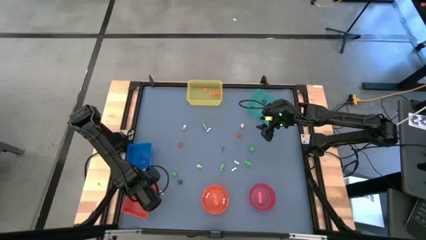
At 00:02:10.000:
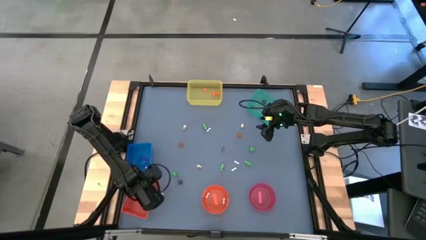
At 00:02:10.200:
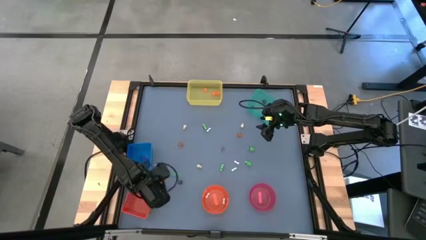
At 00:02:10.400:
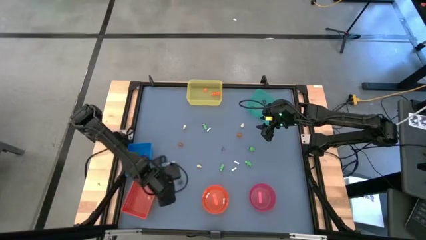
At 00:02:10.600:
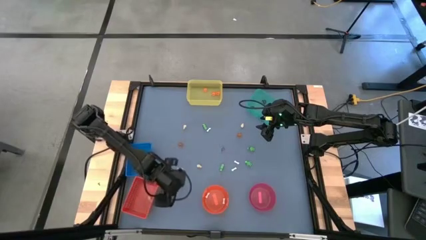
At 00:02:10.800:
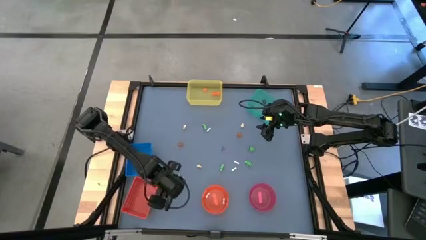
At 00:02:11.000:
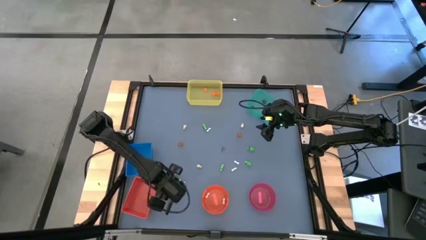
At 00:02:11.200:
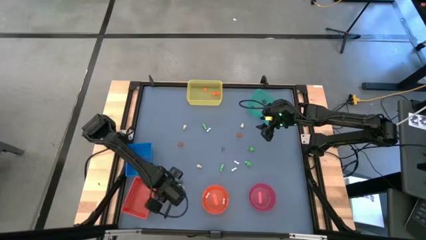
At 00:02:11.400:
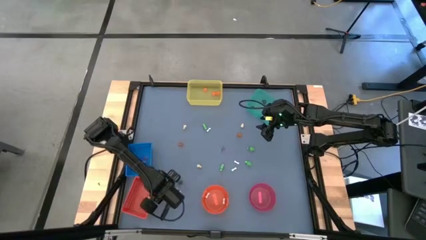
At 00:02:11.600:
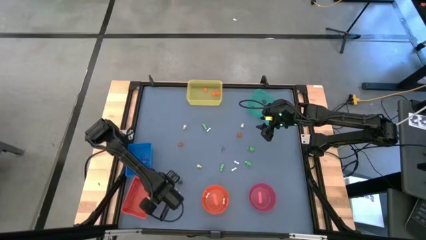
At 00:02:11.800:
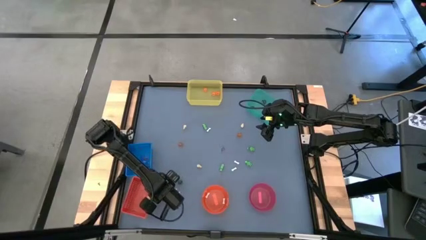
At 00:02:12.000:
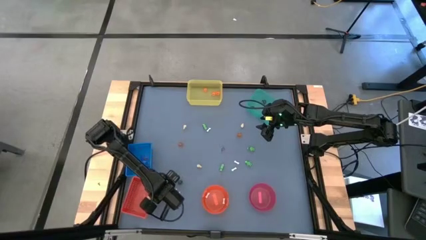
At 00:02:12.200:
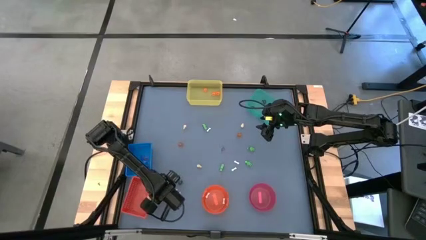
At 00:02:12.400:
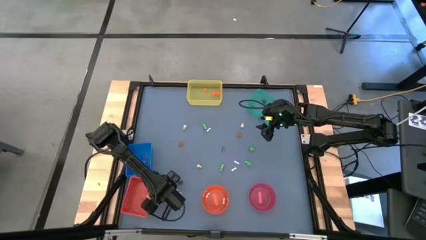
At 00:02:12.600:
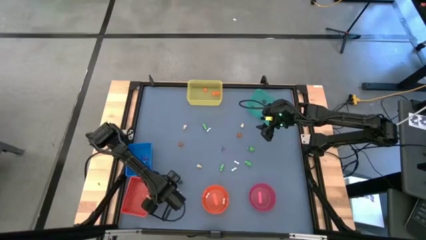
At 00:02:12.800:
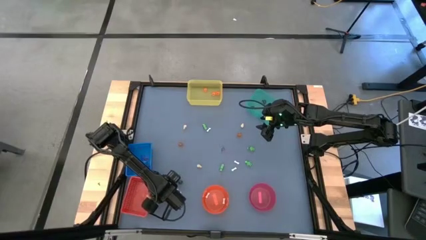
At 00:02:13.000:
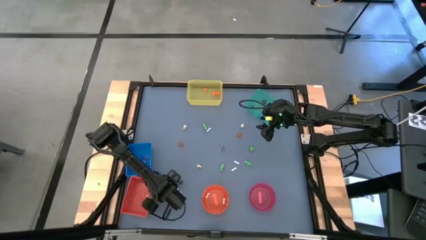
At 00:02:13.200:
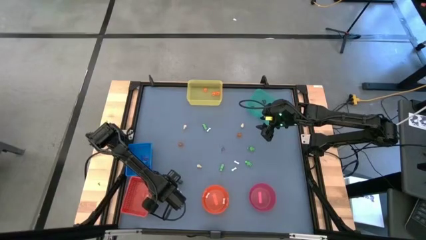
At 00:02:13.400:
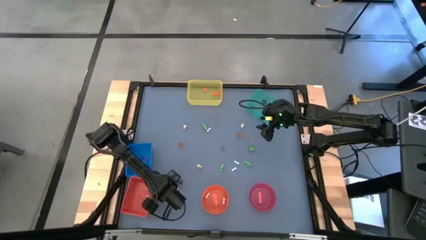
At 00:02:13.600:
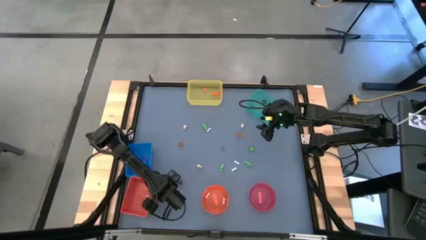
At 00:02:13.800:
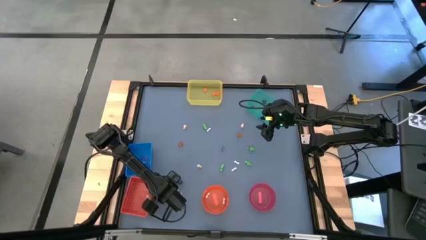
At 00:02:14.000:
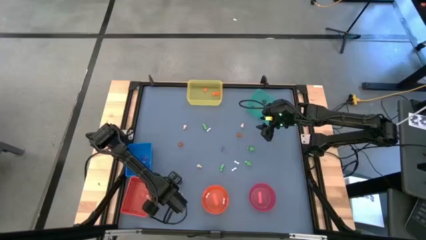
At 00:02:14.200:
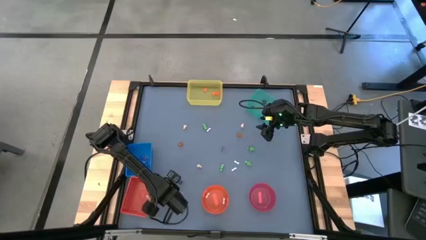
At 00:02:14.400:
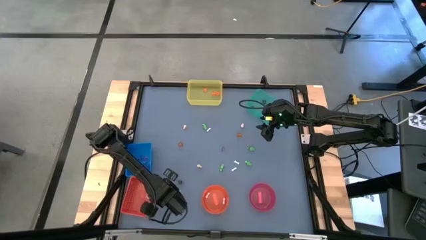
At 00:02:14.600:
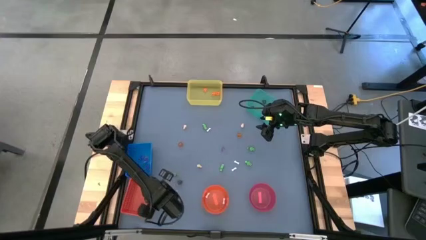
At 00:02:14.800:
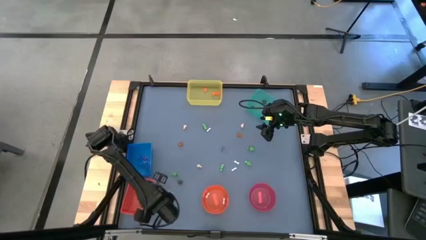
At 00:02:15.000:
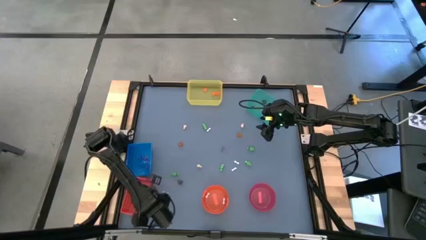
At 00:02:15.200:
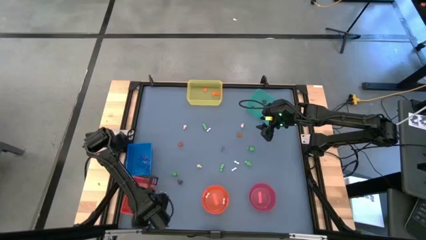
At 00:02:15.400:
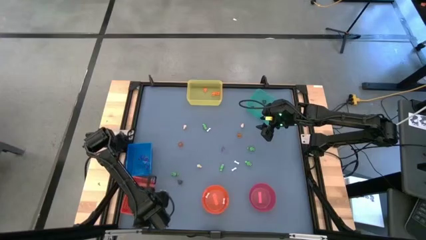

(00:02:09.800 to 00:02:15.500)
Task: Sort Halloween decoration
Put the brown skull toy into the red bin

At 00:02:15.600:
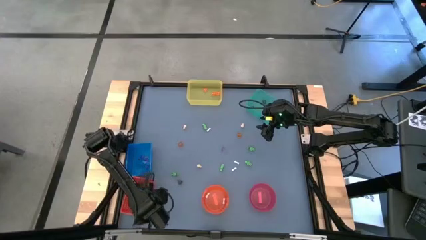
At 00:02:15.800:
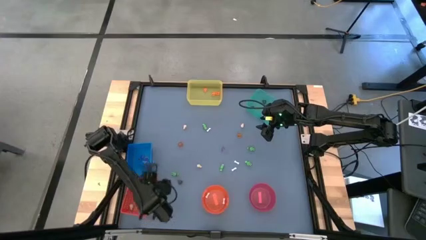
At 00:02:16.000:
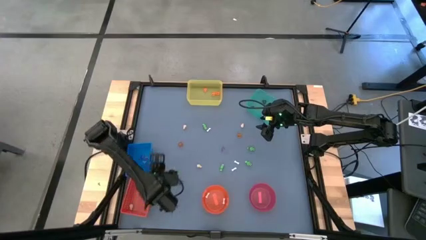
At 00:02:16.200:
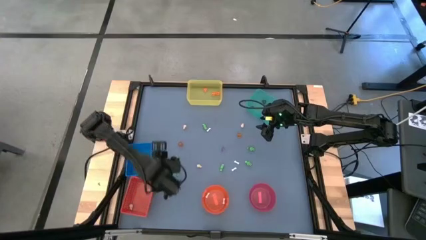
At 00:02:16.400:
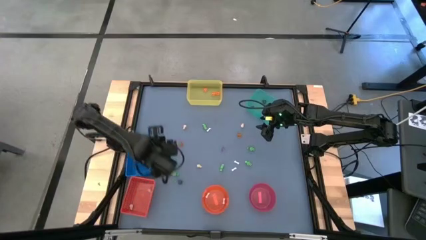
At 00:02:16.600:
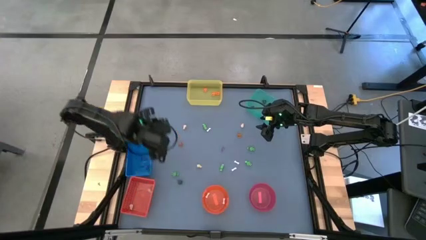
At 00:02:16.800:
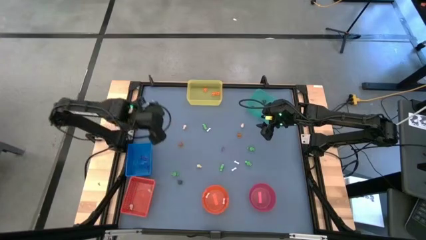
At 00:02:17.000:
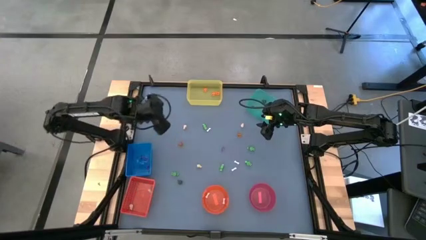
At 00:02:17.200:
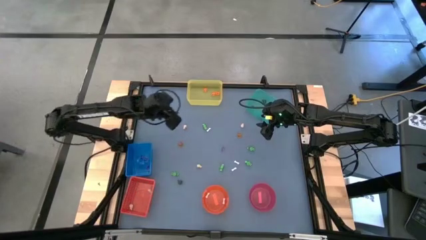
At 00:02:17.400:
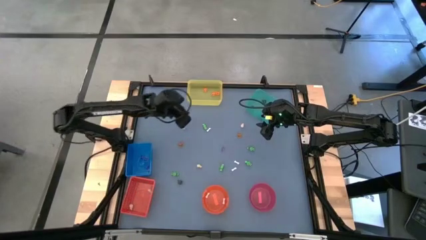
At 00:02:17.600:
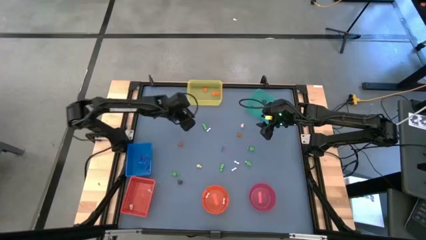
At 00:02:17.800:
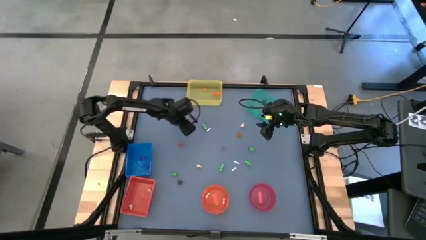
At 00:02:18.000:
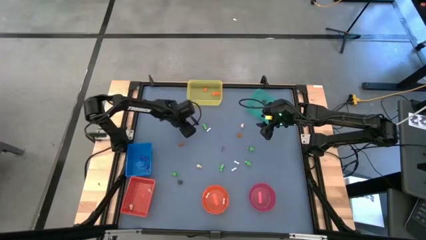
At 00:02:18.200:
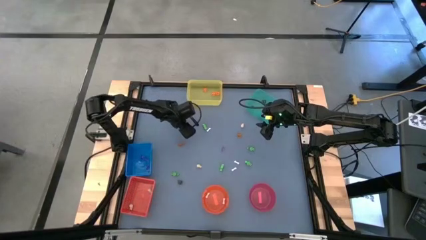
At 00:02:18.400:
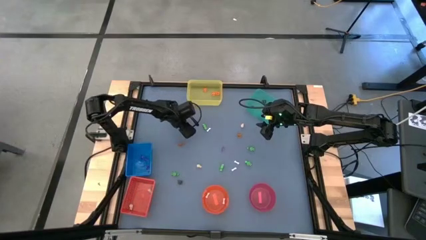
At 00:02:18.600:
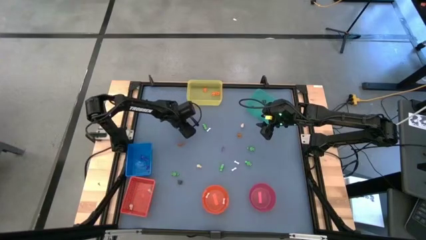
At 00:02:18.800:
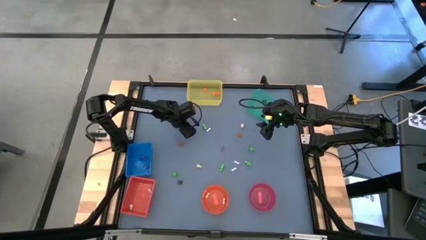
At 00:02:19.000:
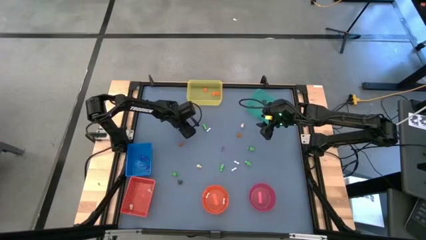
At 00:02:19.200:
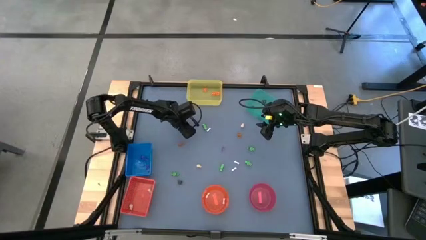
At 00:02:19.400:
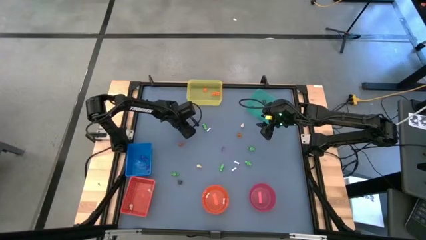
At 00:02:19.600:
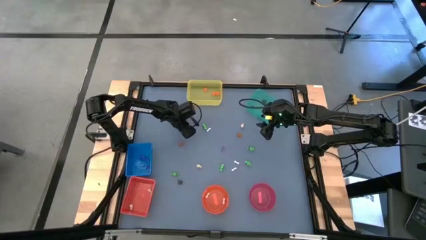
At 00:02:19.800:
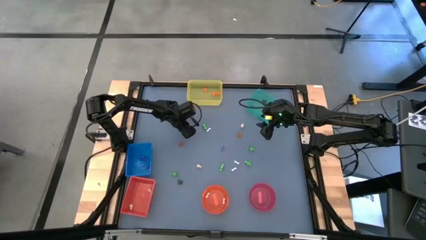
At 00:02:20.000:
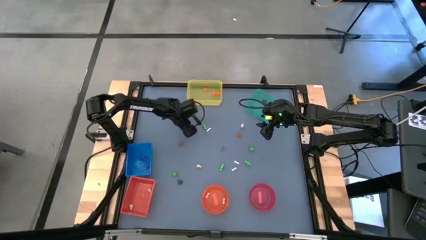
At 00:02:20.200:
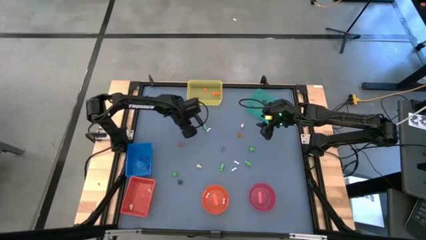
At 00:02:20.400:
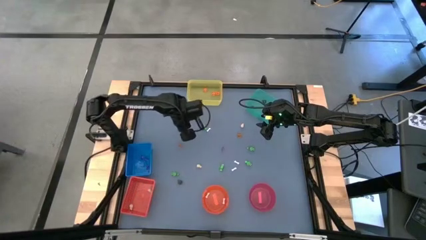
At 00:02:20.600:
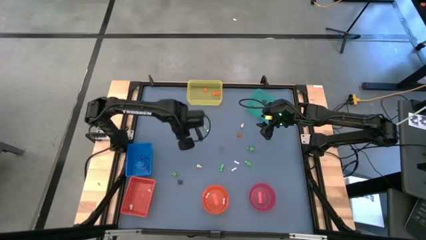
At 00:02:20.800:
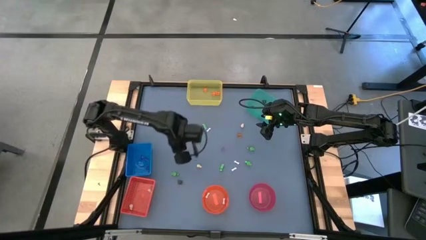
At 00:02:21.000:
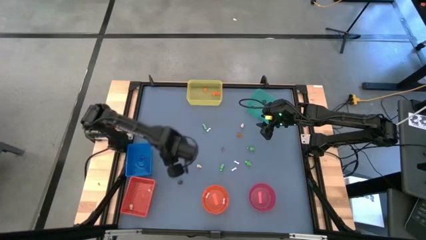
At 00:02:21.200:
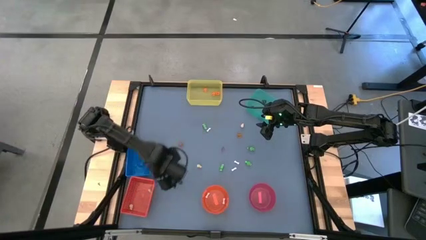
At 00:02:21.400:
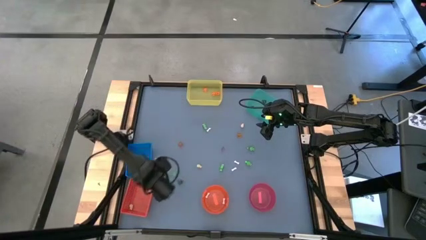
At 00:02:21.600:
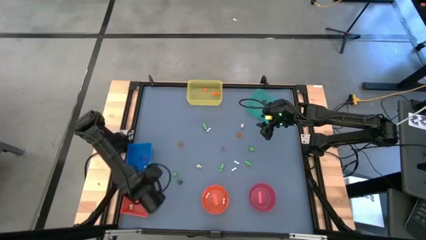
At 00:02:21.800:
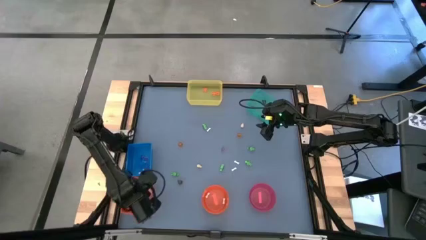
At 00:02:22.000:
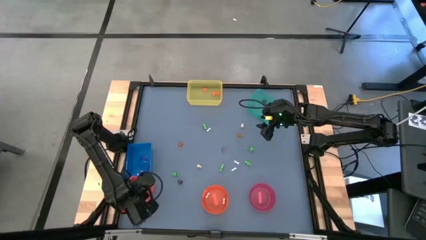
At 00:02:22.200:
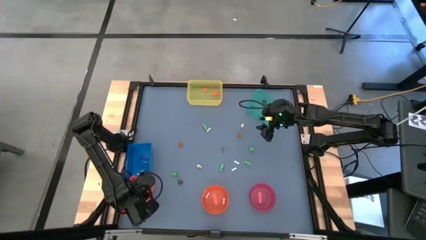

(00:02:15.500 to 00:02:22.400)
Put the brown skull toy into the red bin

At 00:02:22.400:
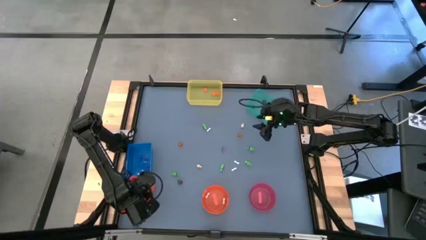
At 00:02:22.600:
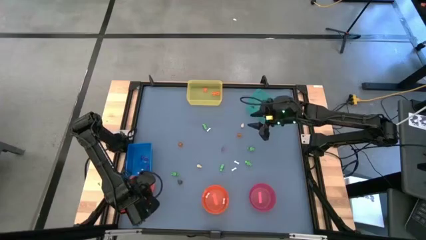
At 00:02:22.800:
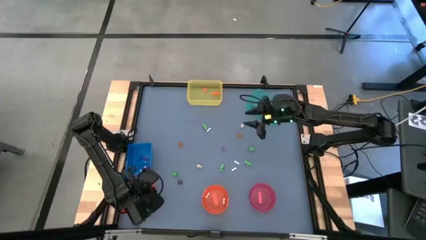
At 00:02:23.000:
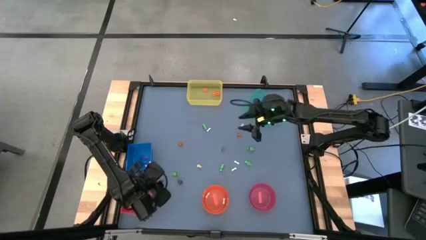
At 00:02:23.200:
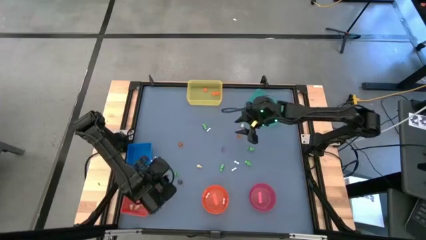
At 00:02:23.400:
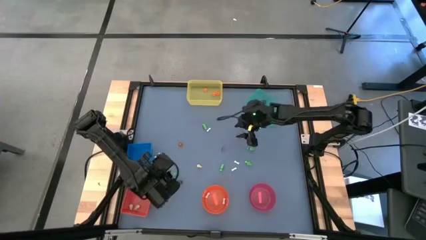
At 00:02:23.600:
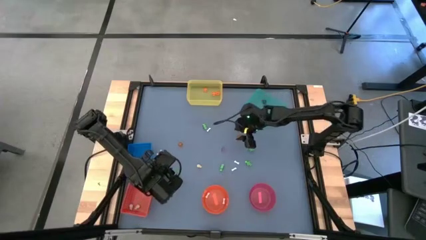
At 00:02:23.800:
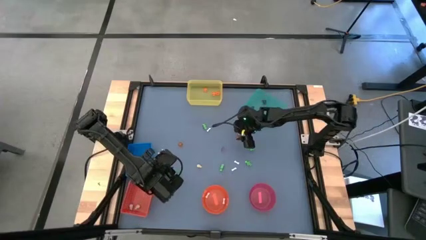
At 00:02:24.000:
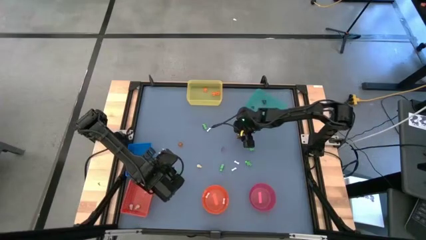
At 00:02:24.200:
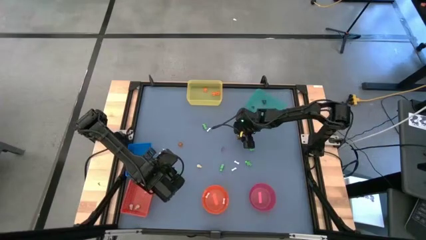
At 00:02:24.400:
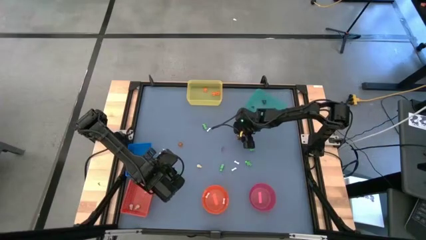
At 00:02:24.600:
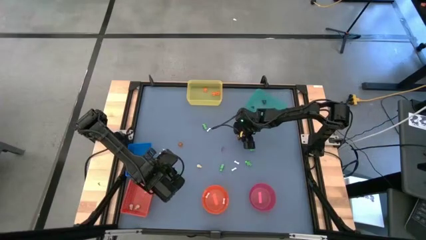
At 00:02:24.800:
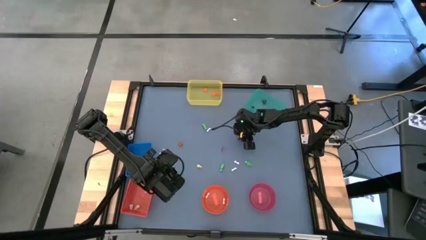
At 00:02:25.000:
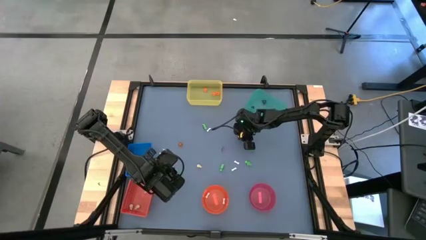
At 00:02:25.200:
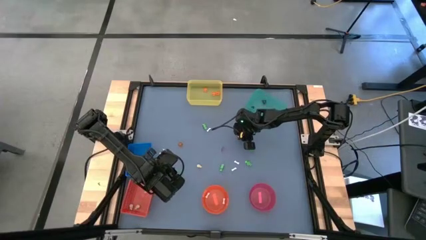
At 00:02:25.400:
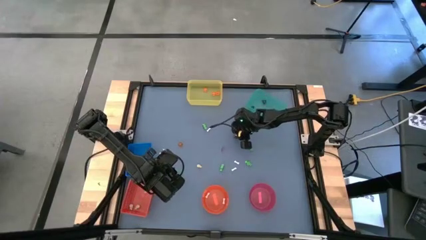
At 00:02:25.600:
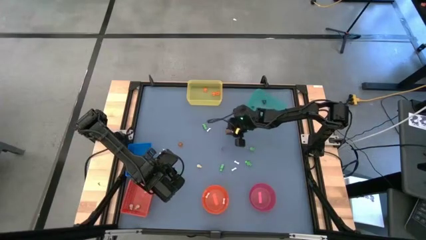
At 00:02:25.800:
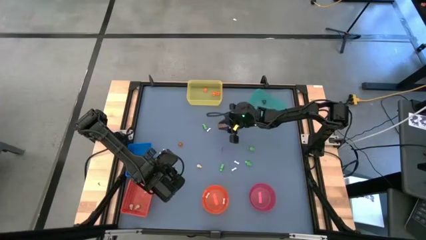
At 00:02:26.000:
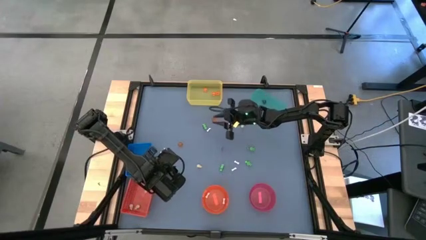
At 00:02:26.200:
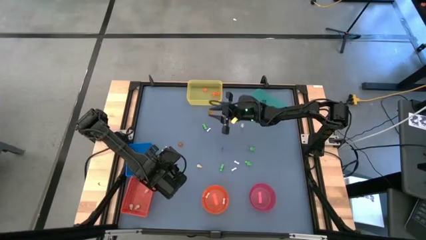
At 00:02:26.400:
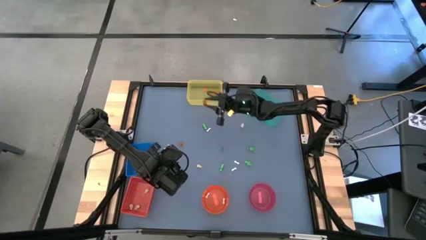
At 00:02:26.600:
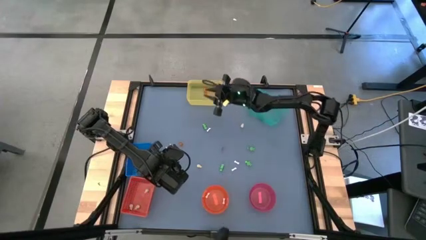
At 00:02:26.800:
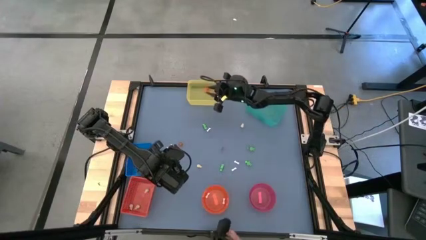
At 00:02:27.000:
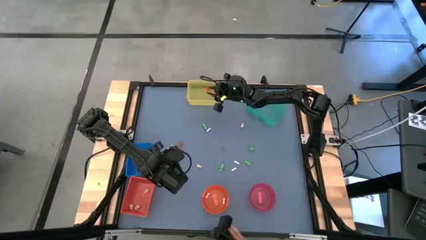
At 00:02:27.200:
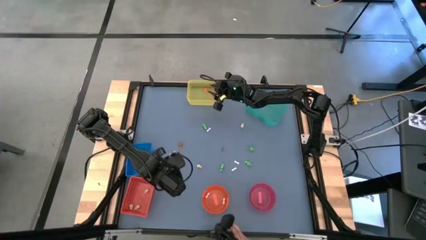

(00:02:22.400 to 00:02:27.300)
Put the orange pumpkin toy into the yellow bin
